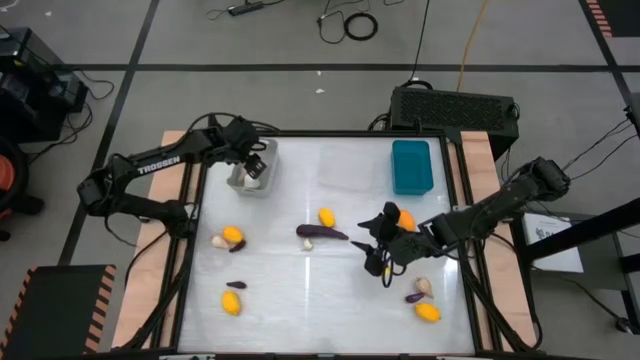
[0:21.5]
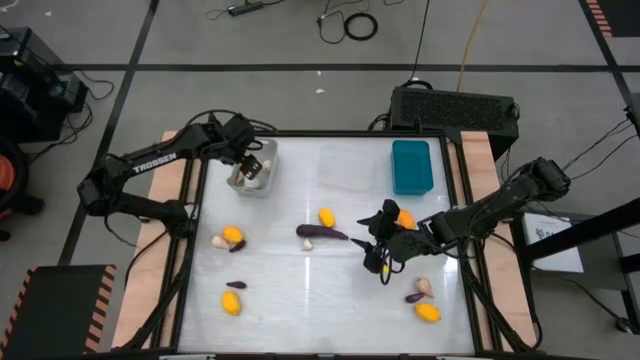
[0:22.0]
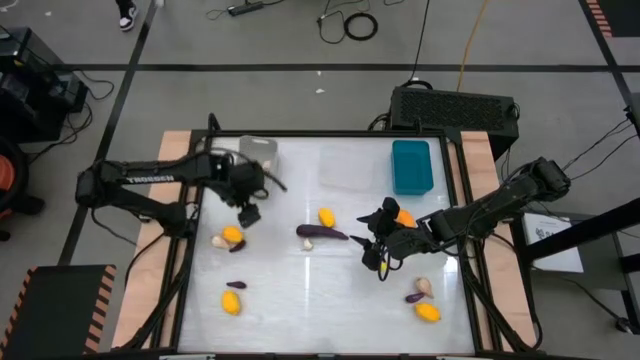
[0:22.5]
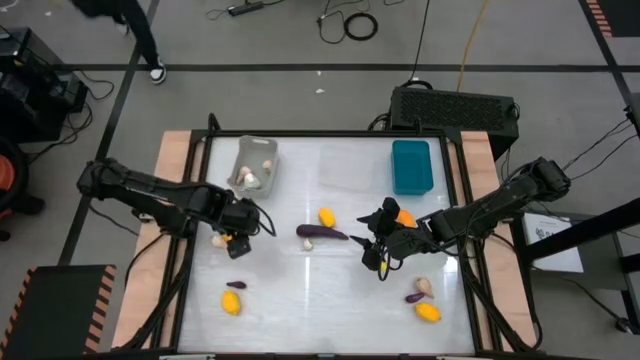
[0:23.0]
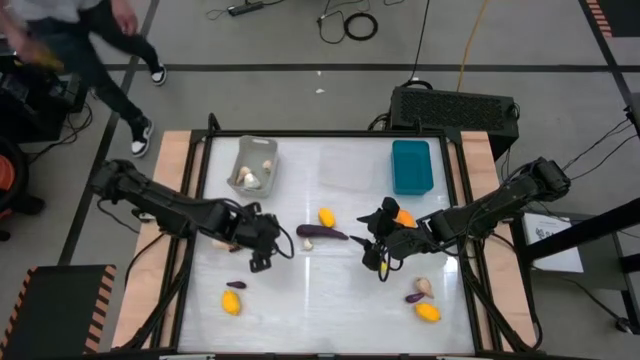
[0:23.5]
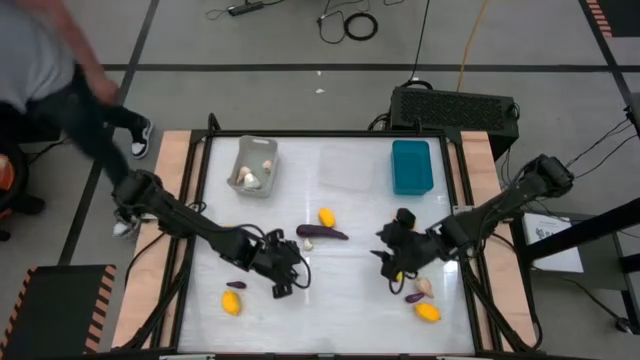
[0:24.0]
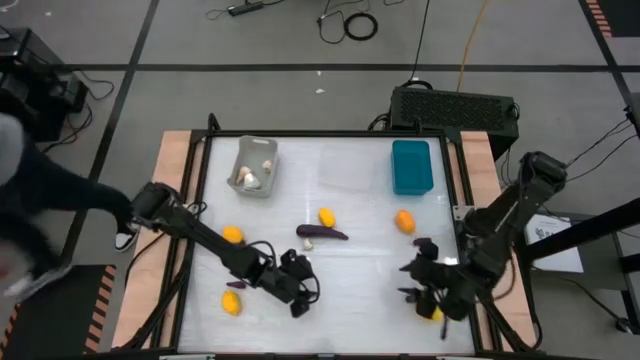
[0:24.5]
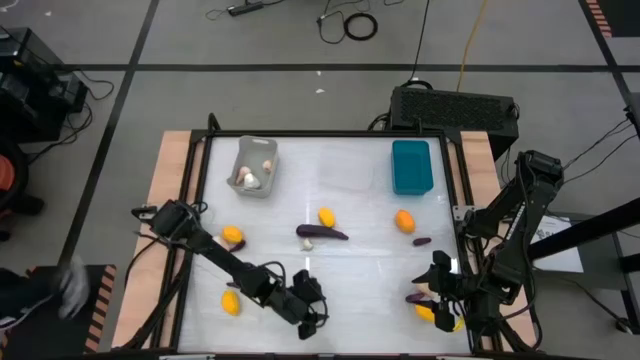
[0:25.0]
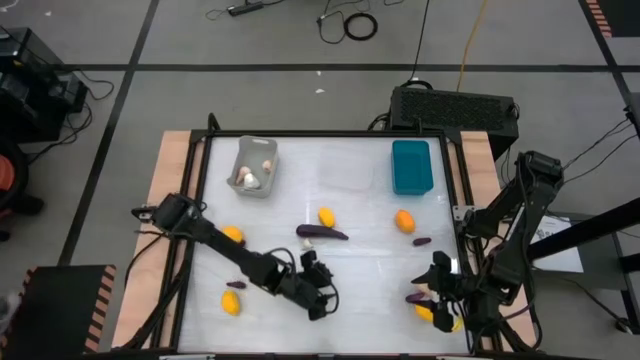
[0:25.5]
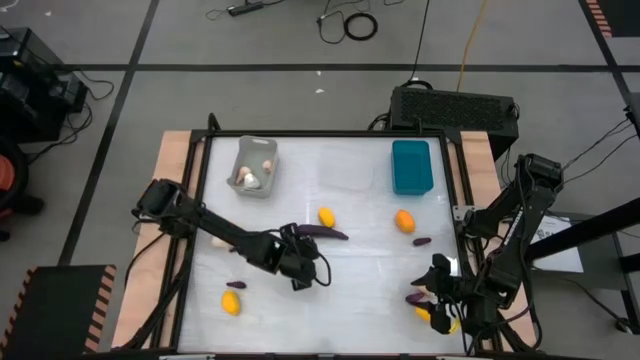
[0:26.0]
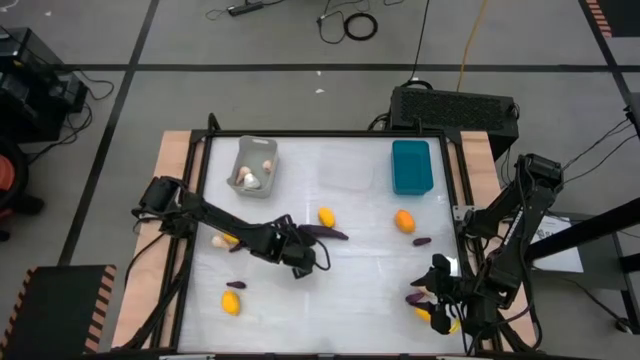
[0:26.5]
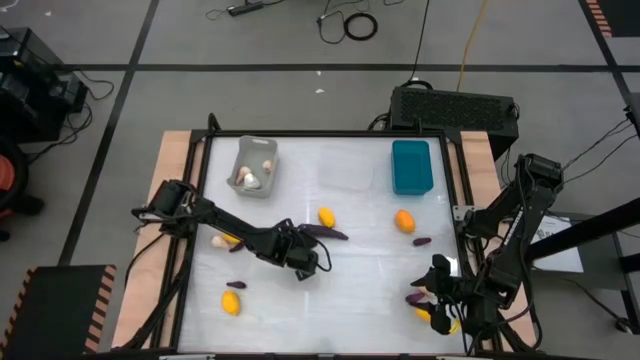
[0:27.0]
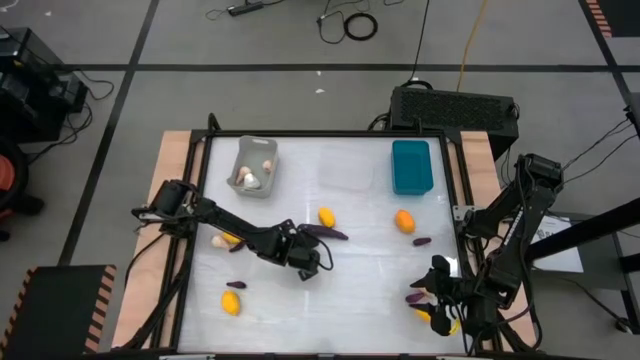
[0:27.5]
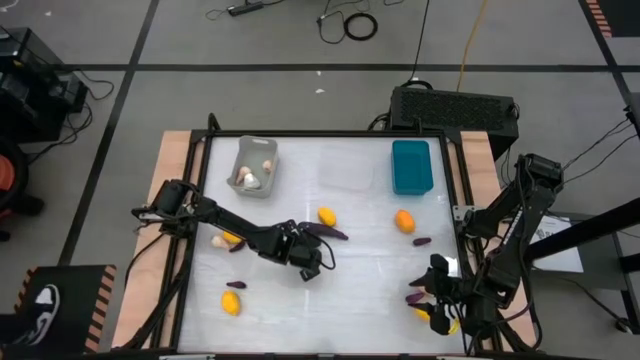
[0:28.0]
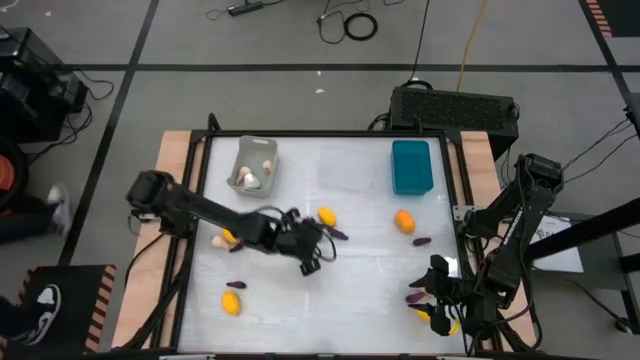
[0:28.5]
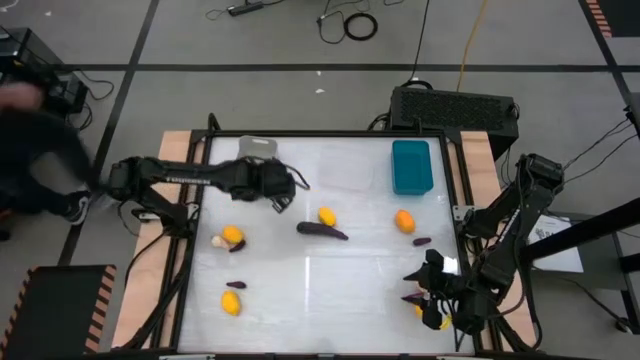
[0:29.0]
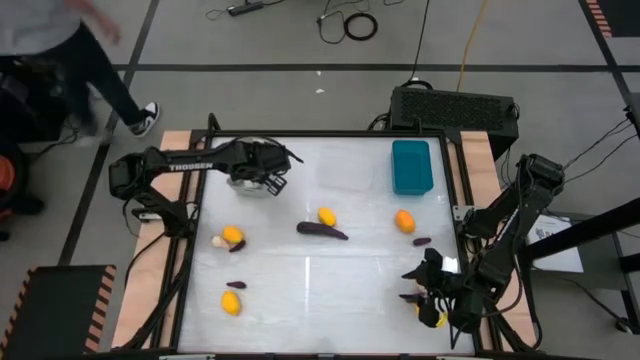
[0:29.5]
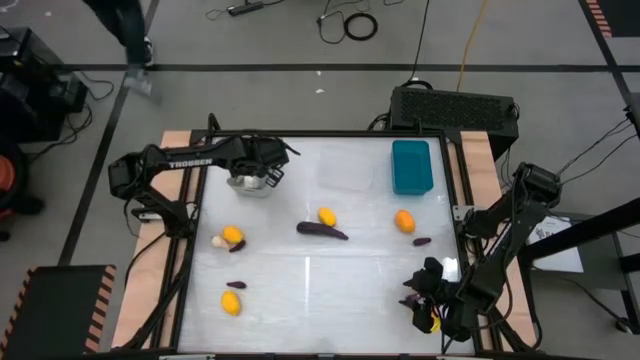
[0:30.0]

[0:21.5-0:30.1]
Task: Sort produce into baskets
Put the garlic into the gray bin

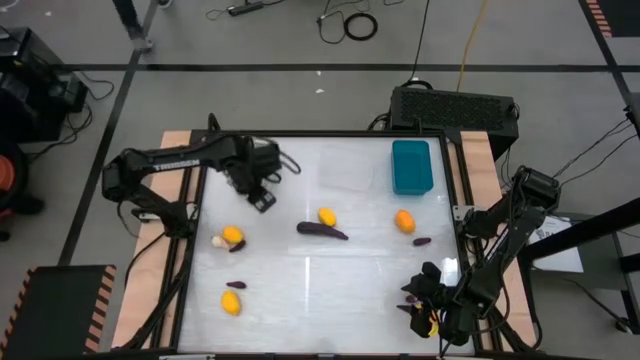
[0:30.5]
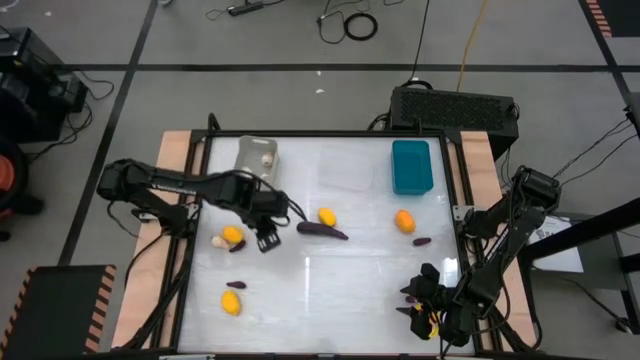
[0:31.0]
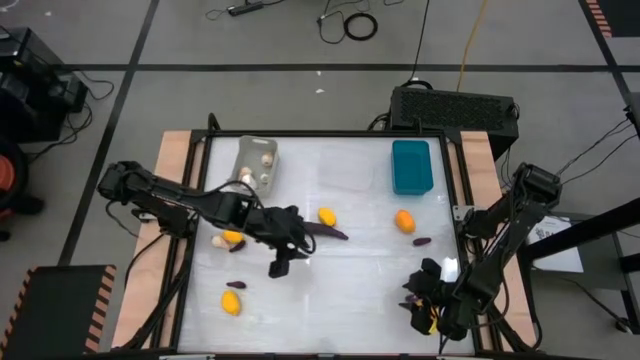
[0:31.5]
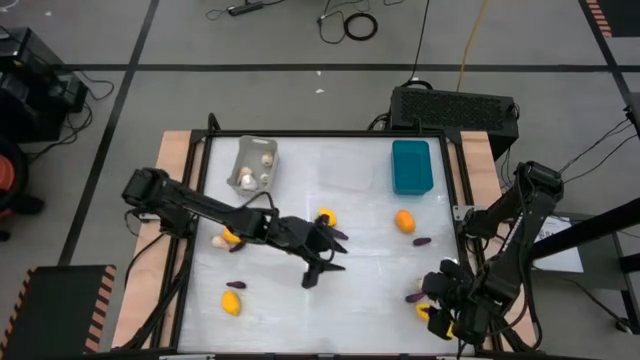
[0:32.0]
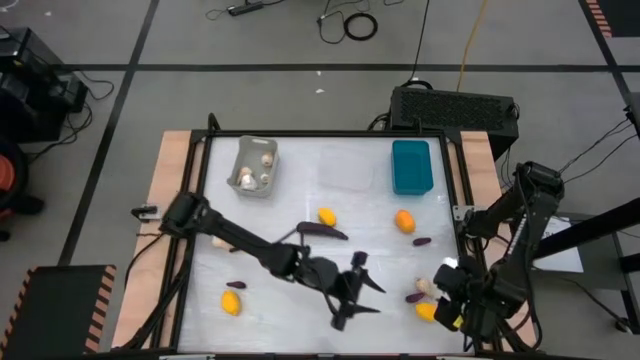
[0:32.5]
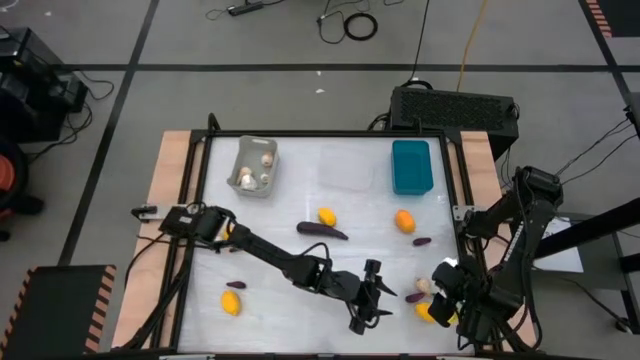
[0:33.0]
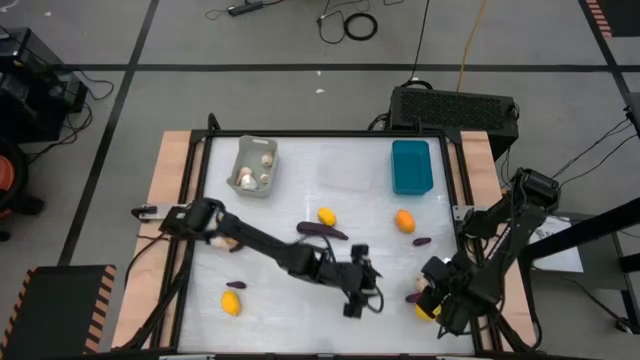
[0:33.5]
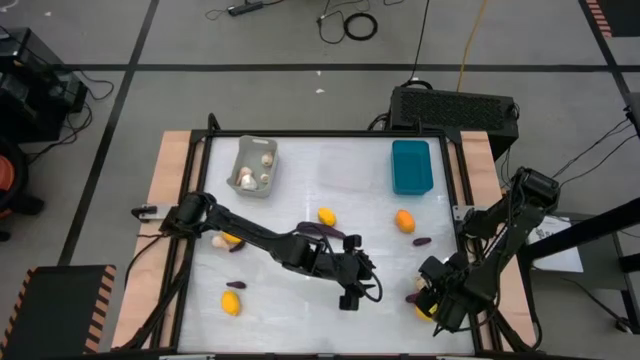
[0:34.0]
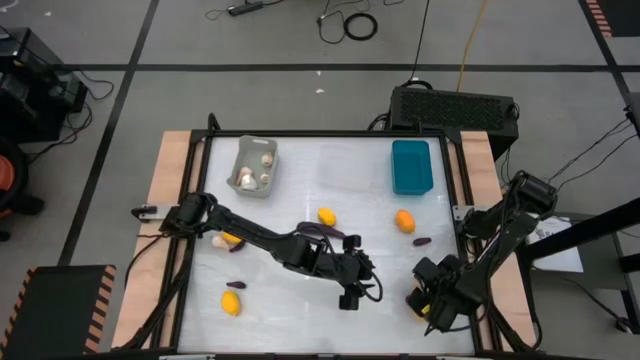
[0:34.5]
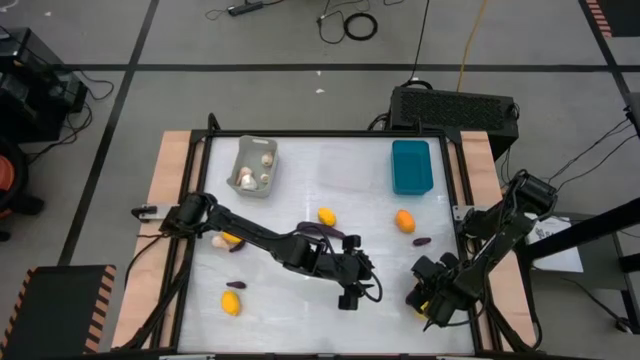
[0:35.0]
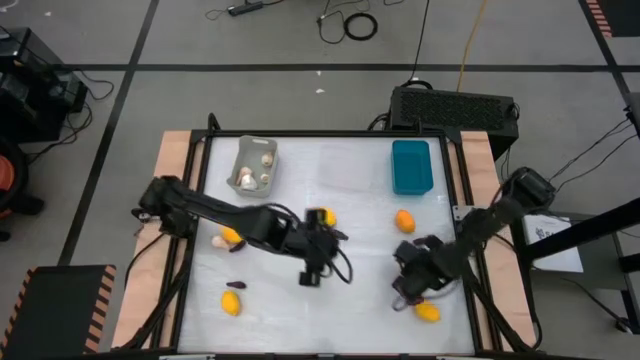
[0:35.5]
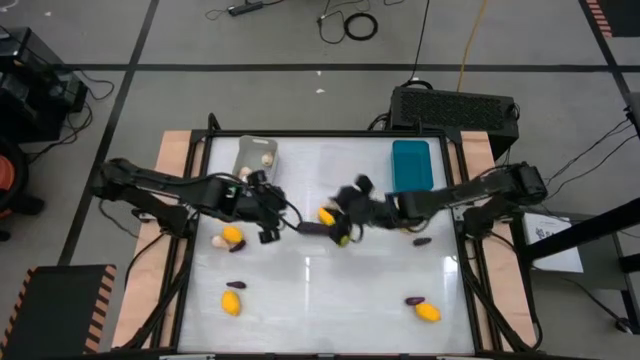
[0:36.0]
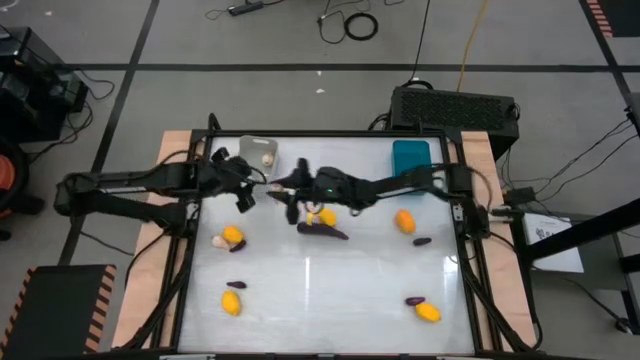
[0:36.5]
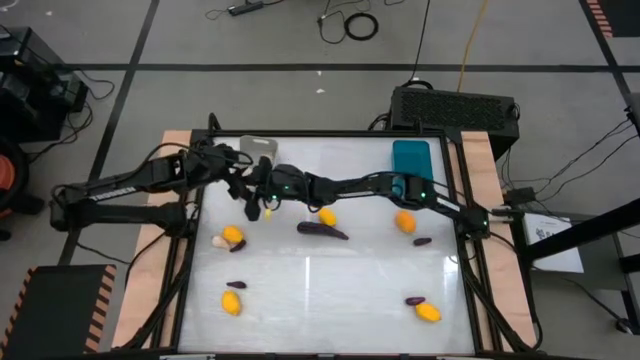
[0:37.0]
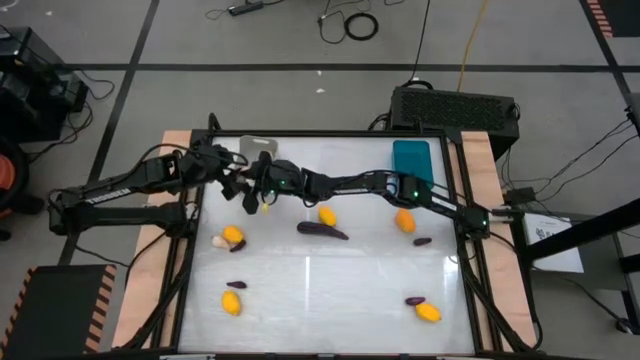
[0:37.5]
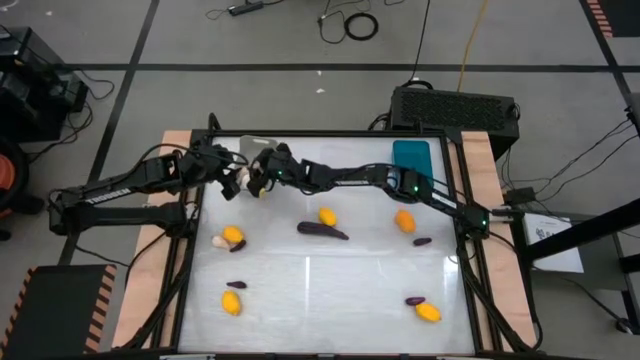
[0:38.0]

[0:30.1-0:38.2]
Put the garlic into the gray bin

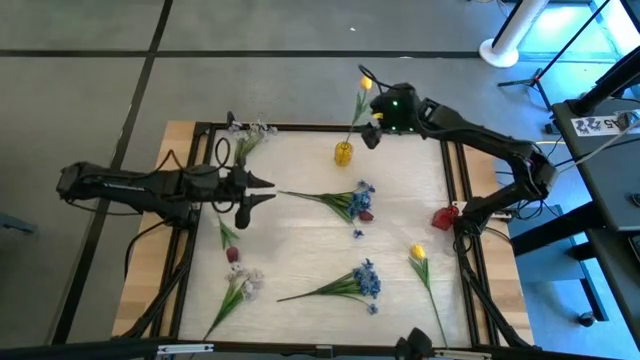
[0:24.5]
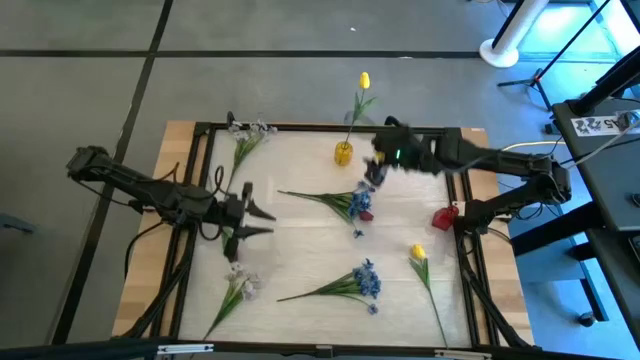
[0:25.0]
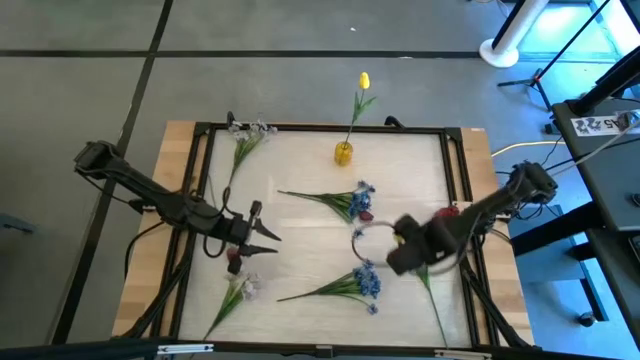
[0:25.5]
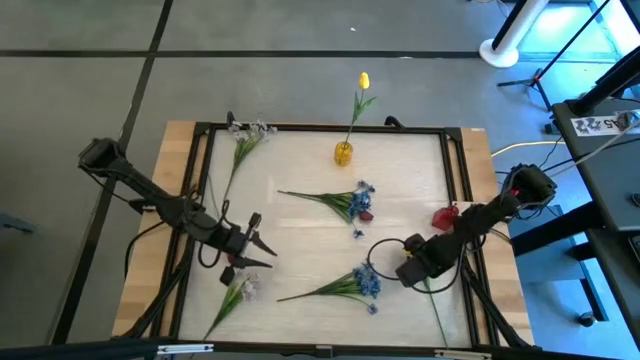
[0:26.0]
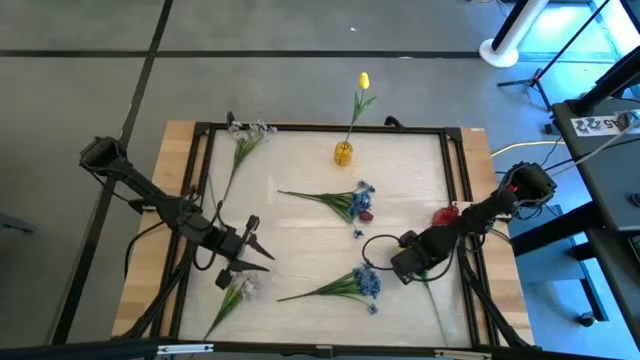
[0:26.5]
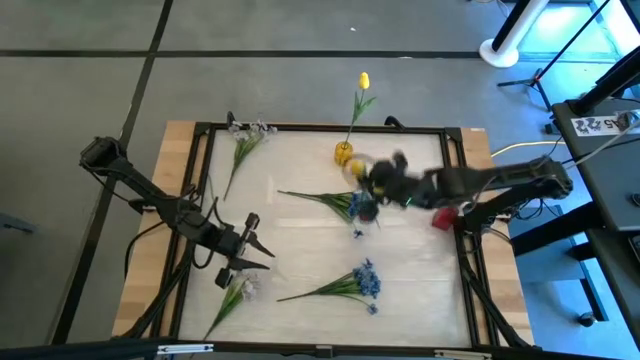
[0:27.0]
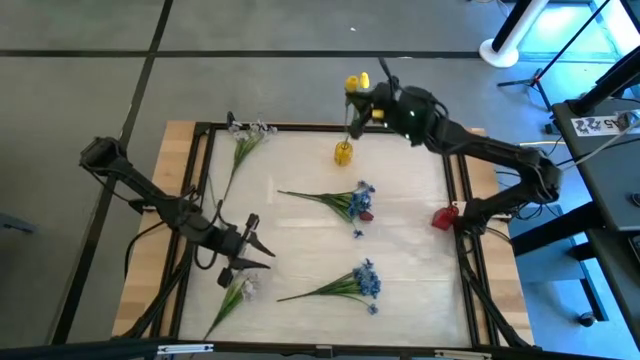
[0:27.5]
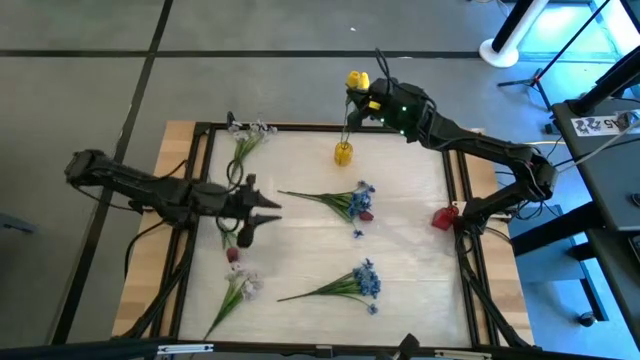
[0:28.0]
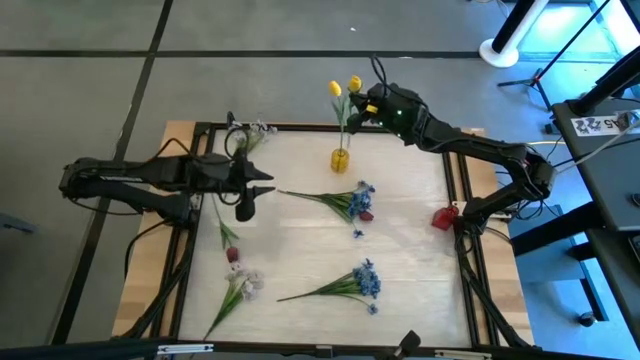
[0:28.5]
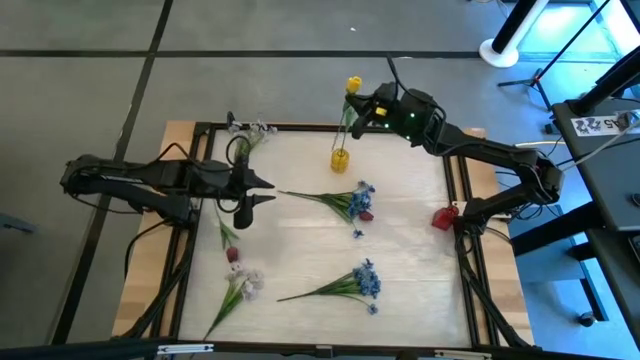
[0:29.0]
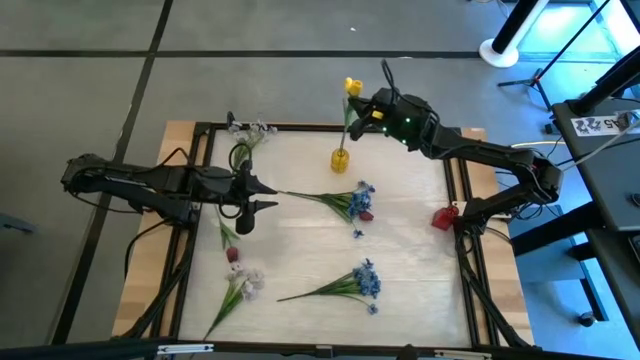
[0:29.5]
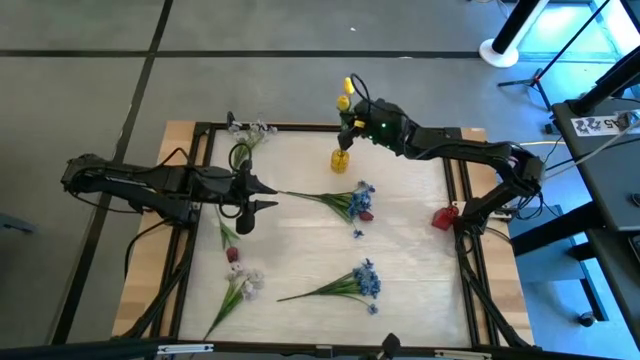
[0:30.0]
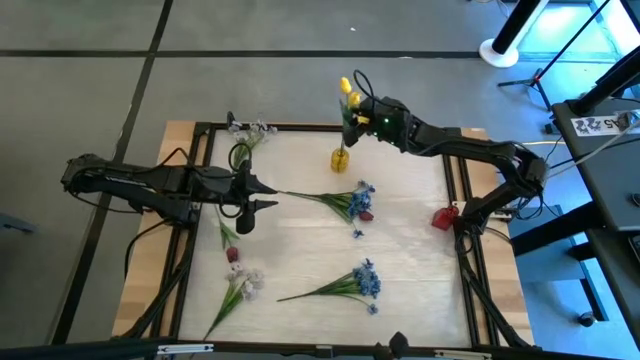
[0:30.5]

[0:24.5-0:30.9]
Task: Sort flowers into vase by color
Put the yellow flower into the yellow vase
